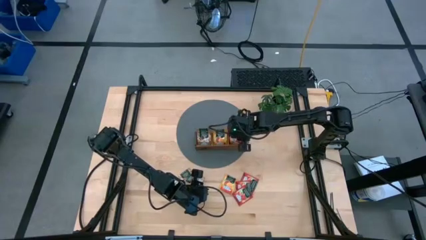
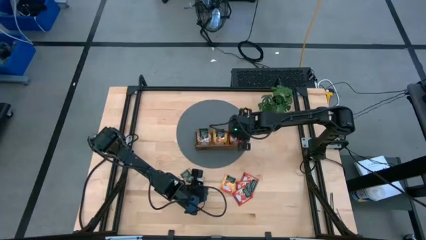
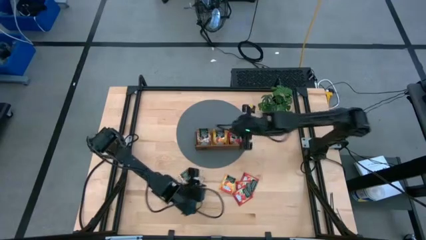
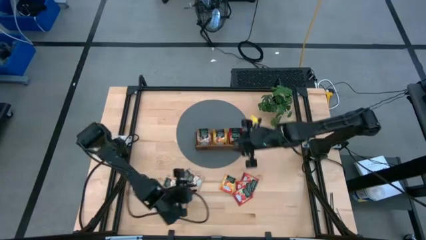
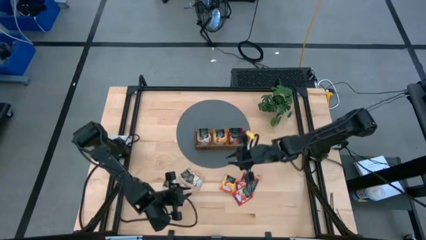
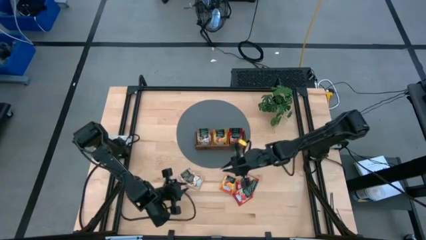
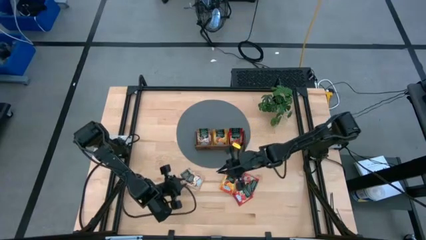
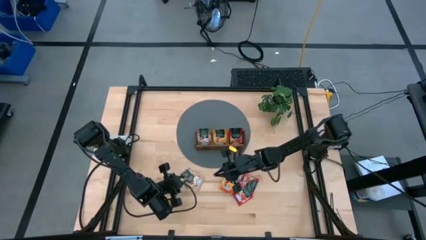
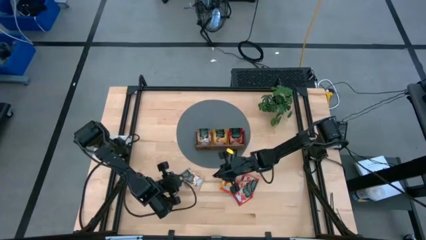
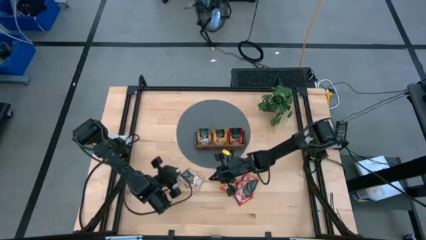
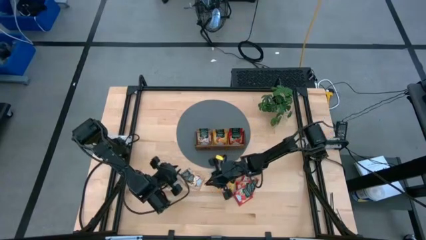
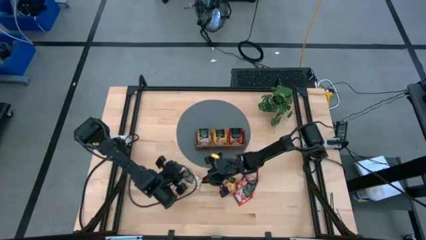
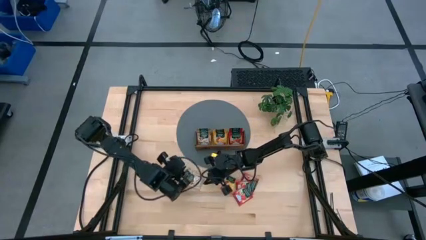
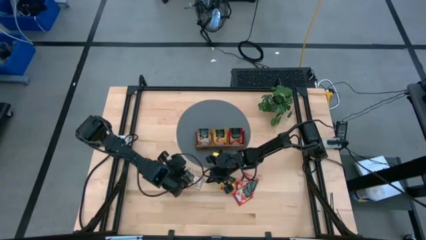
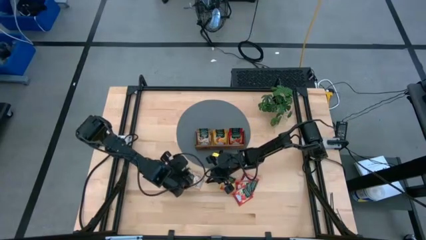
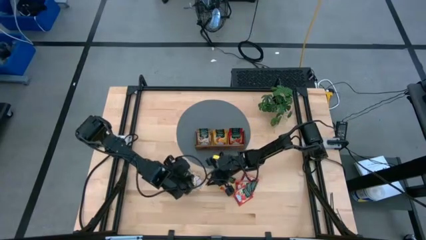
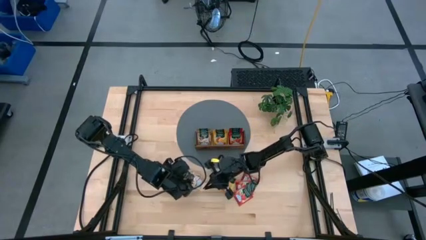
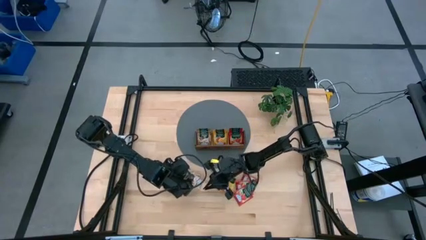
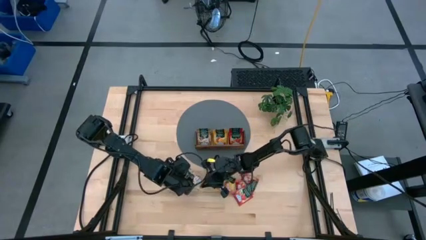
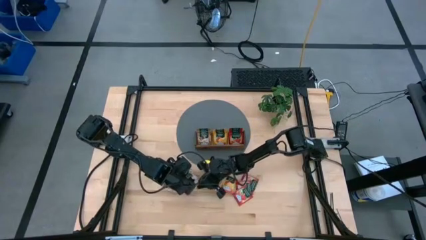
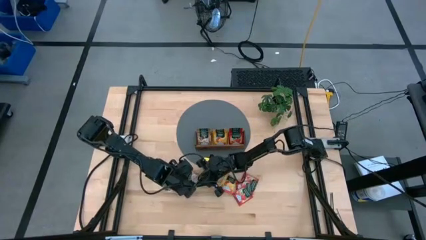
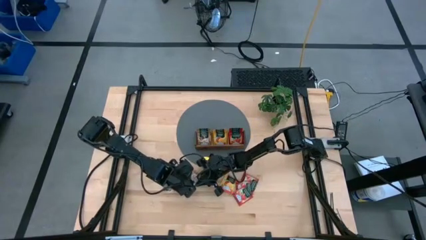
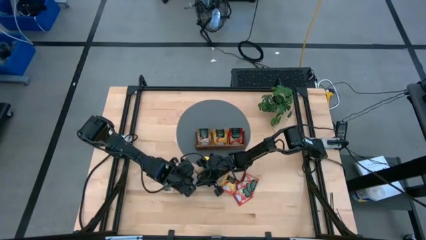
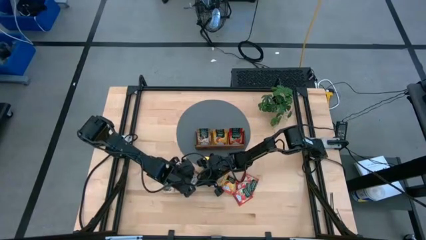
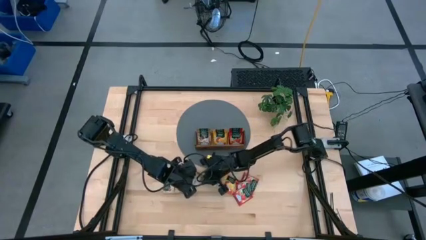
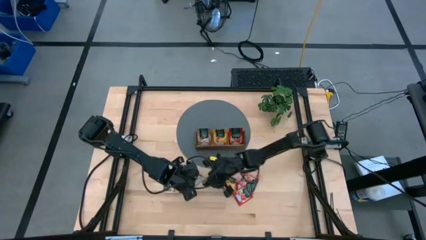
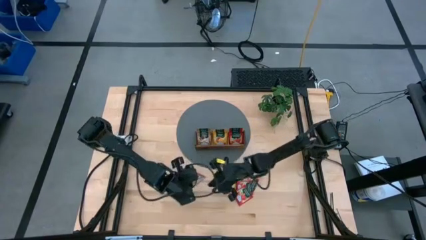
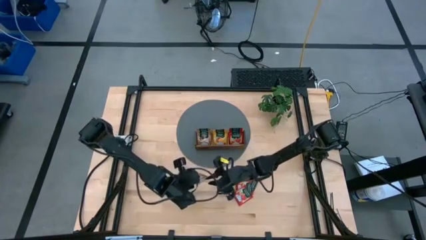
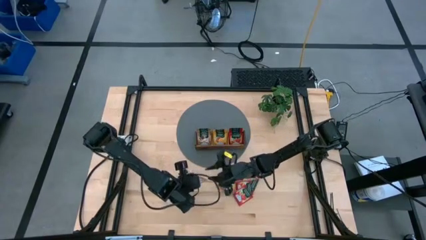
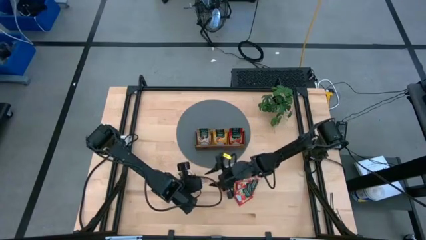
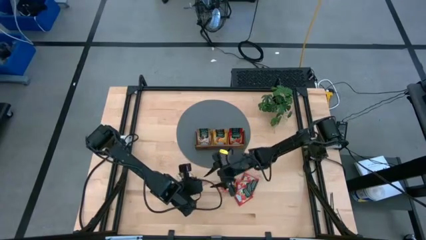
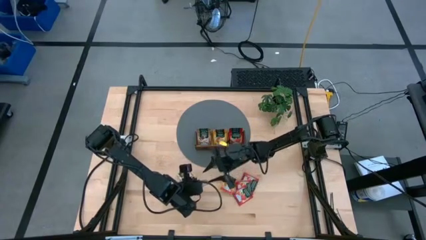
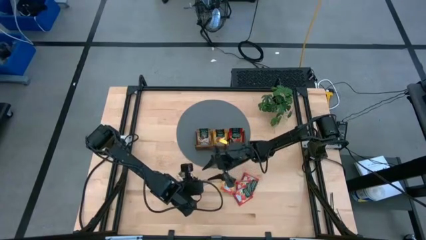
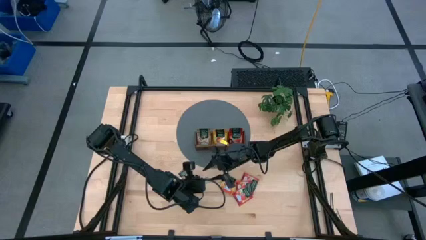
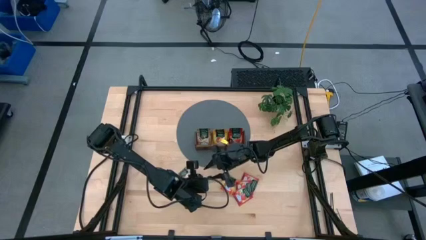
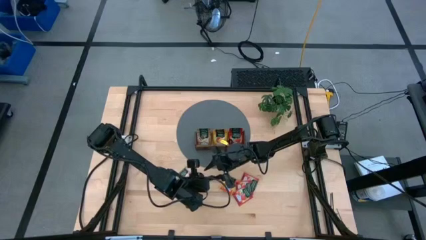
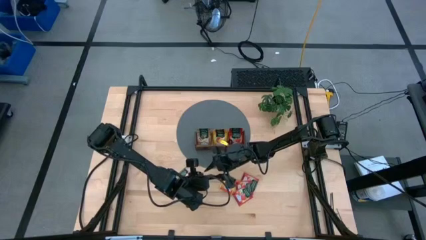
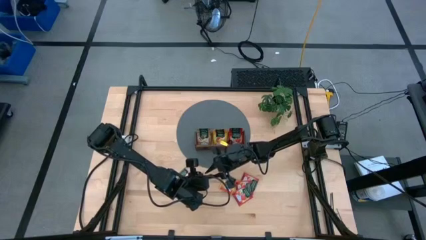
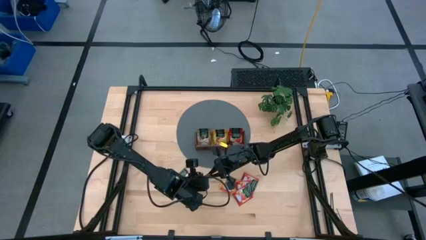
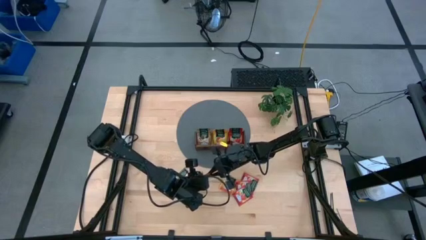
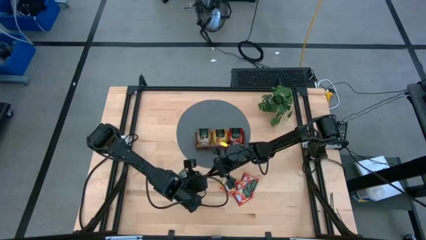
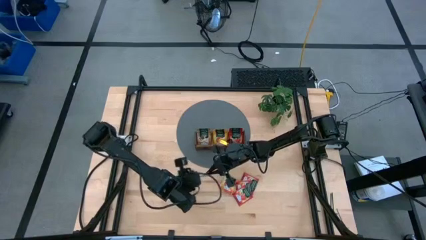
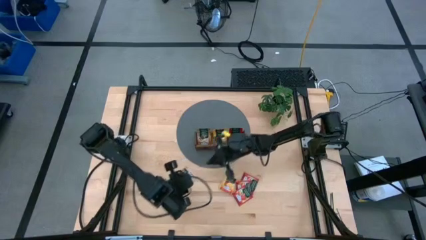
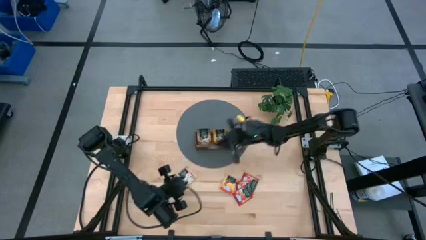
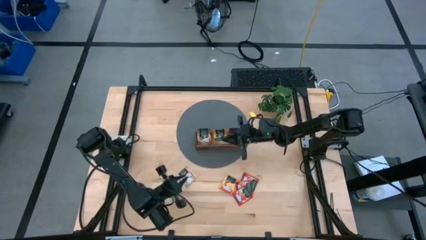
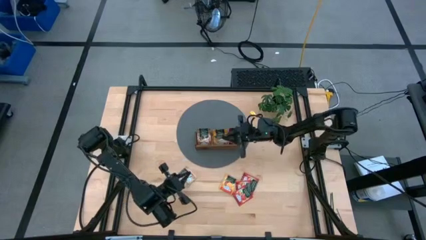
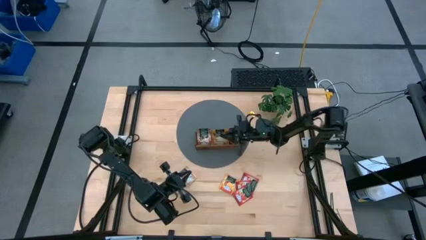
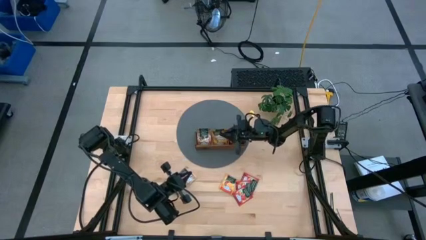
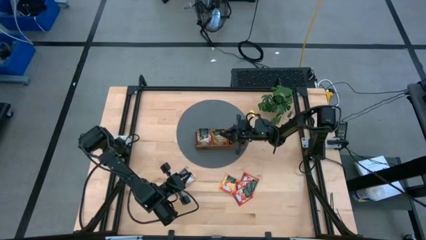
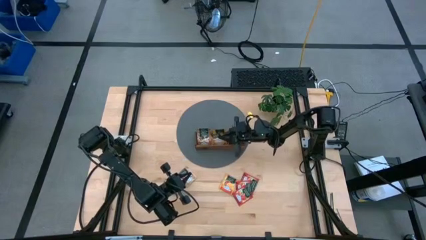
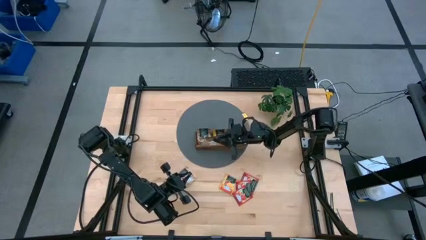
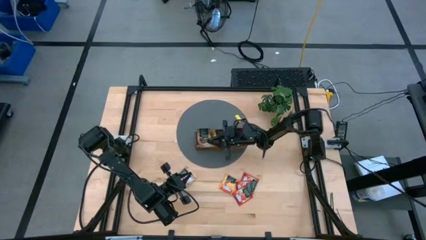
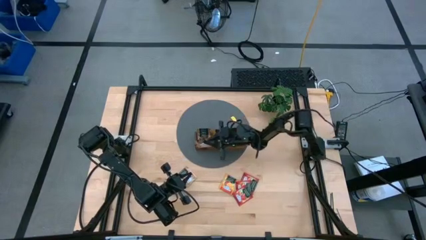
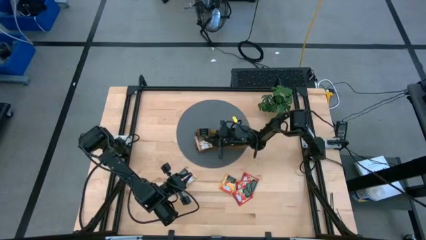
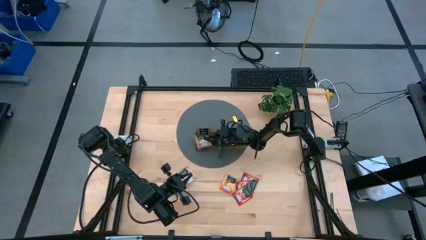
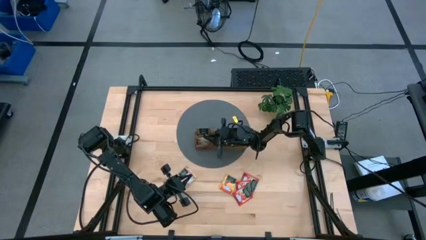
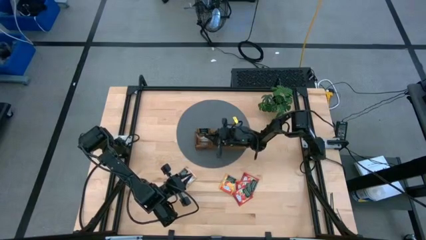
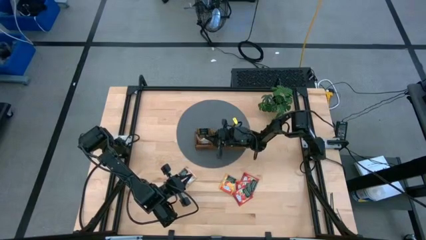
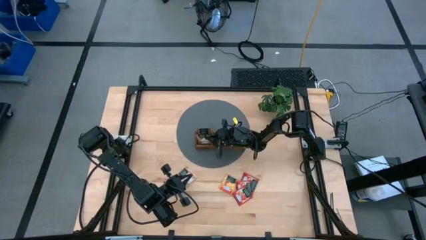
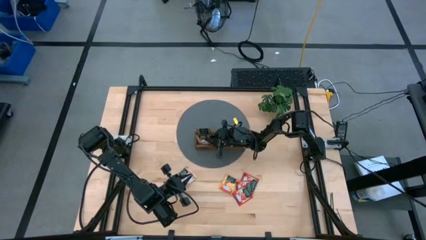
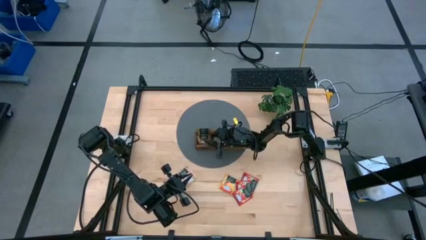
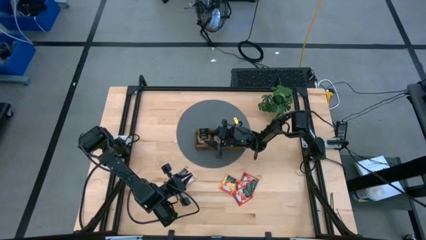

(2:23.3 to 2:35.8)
Task: Pick & Place Tea
Put the brown tea bag into the left section of the wooden organizer

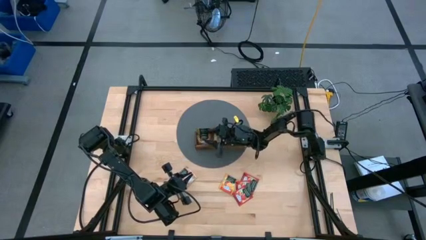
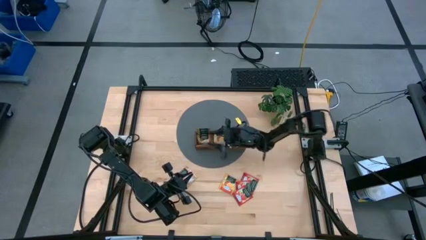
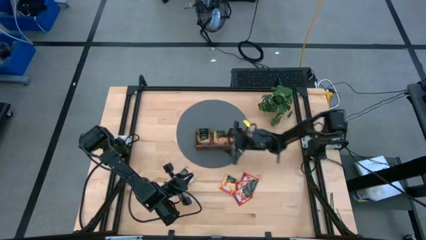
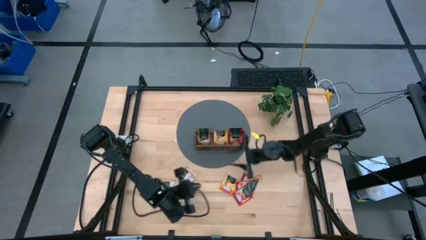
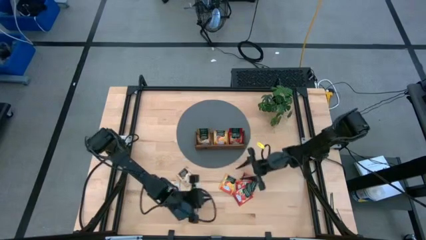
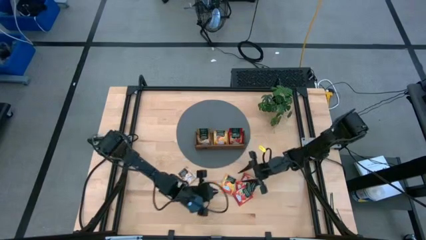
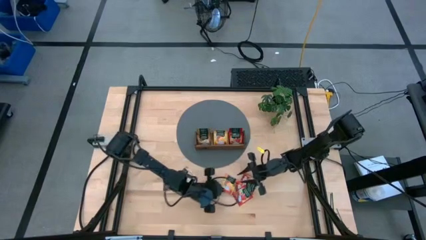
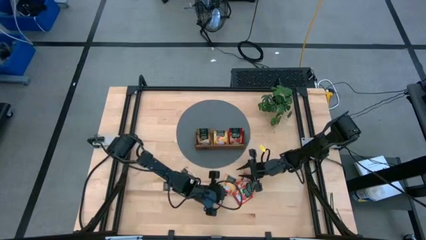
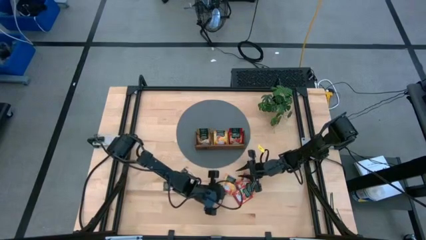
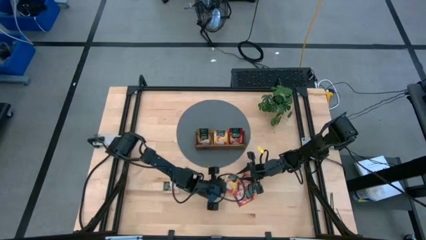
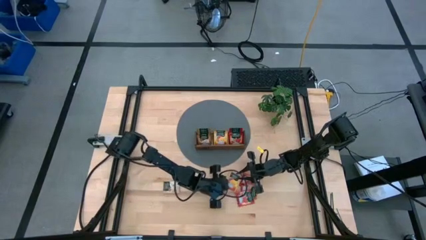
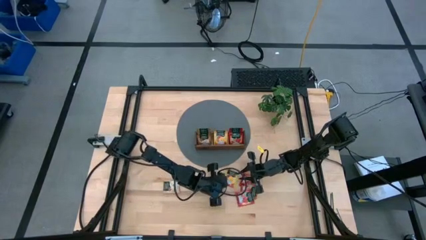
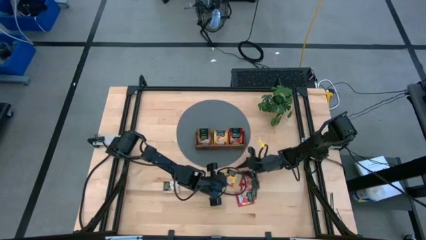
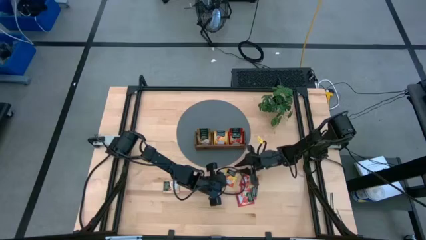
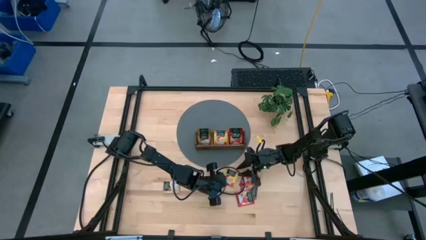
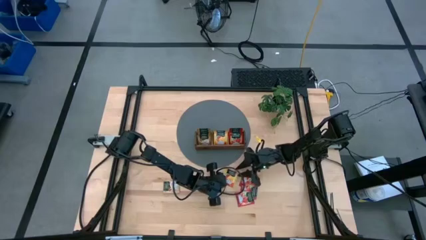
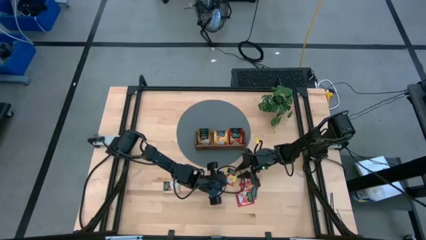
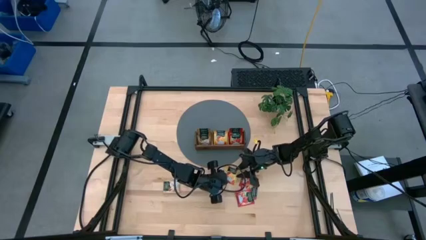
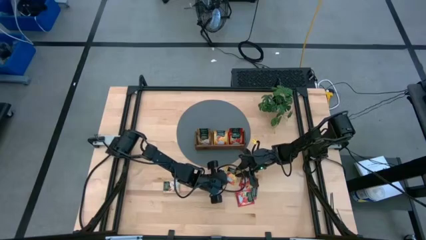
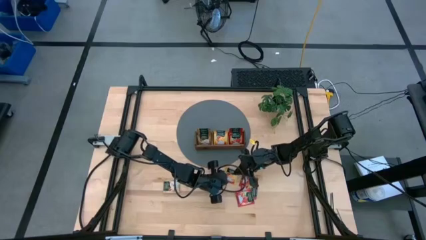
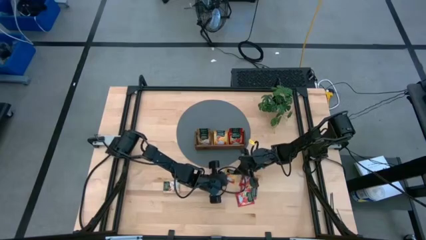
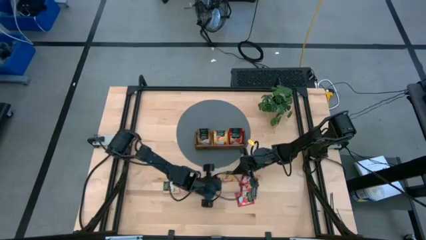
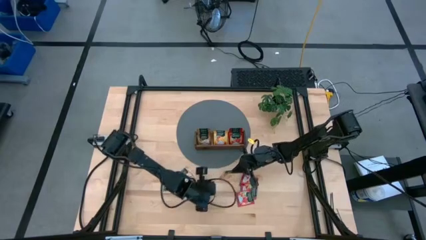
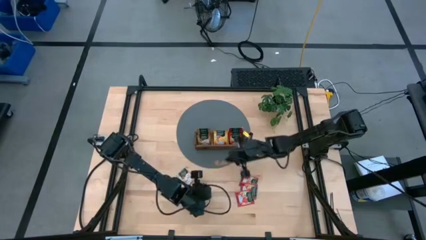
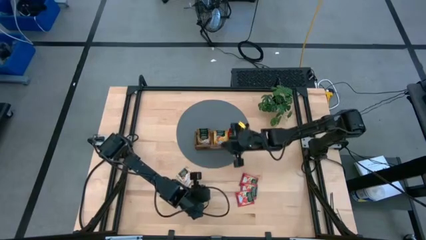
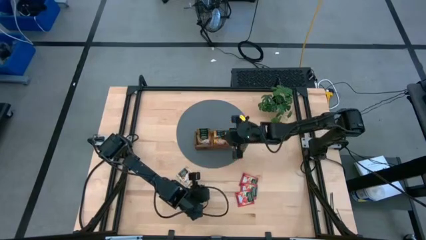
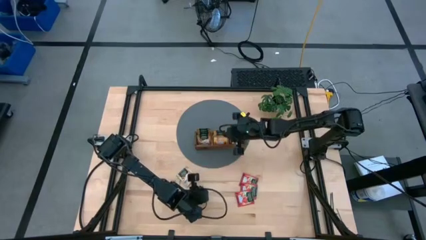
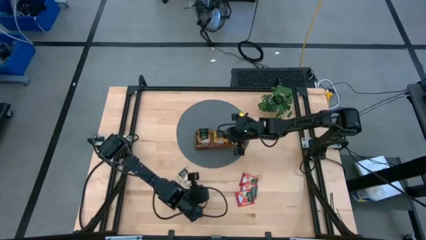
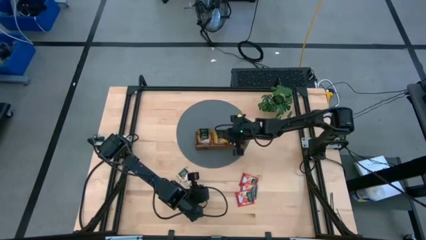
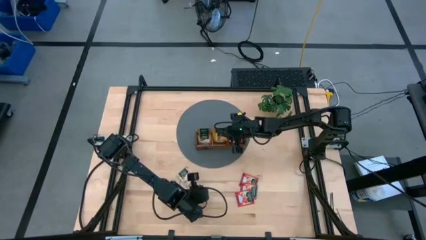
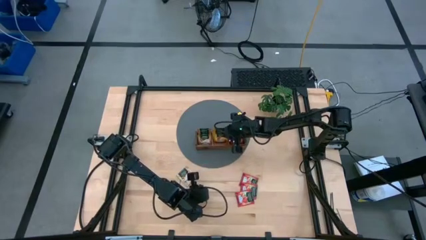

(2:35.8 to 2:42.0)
Put the yellow tea bag into the middle section of the wooden organizer
